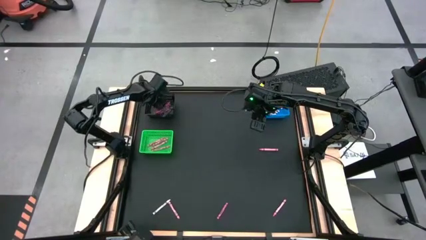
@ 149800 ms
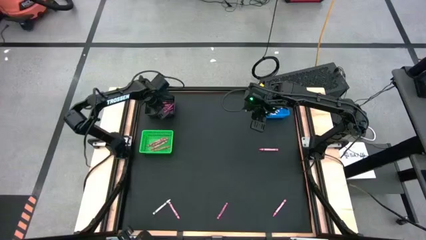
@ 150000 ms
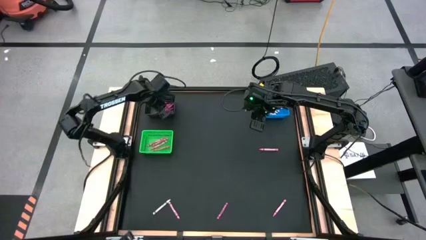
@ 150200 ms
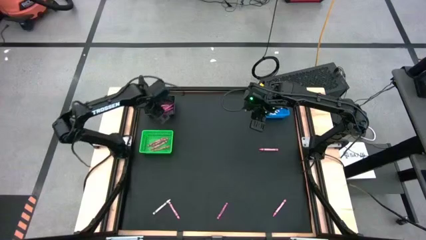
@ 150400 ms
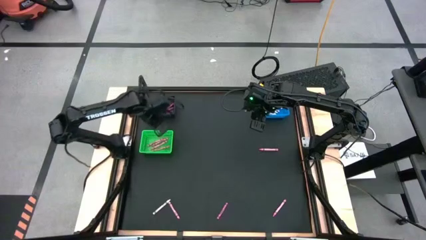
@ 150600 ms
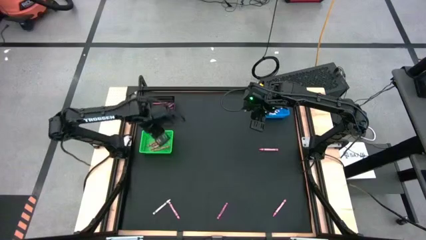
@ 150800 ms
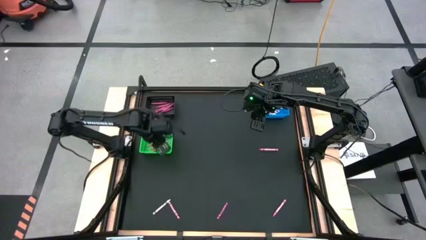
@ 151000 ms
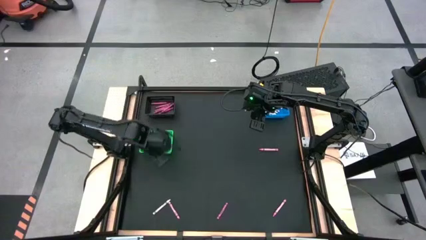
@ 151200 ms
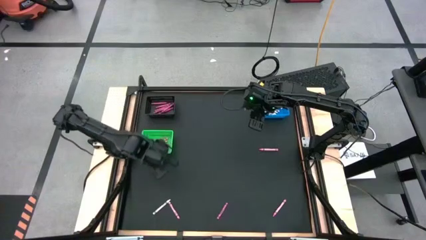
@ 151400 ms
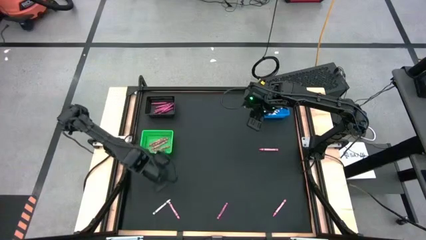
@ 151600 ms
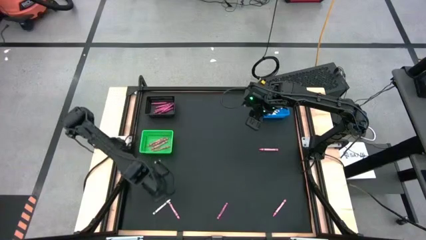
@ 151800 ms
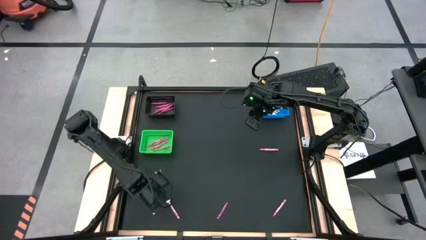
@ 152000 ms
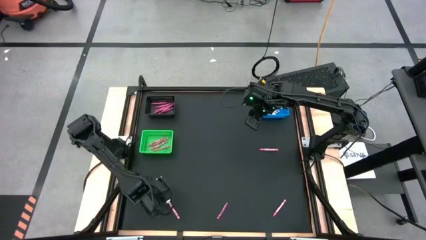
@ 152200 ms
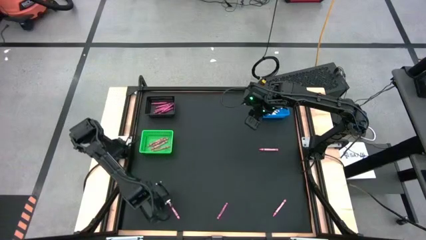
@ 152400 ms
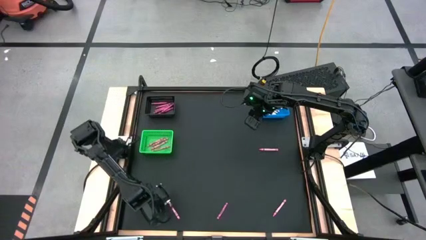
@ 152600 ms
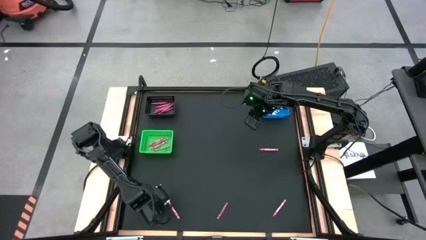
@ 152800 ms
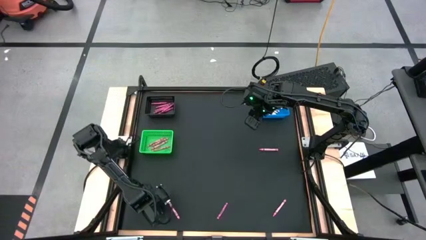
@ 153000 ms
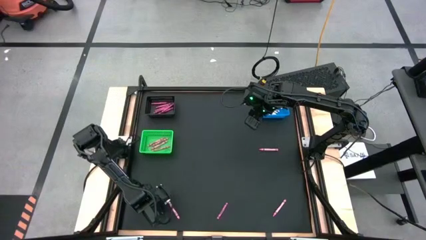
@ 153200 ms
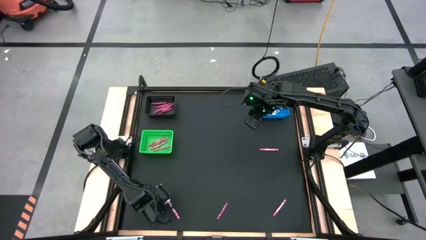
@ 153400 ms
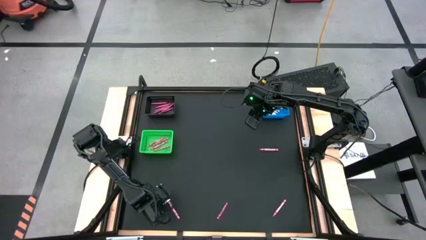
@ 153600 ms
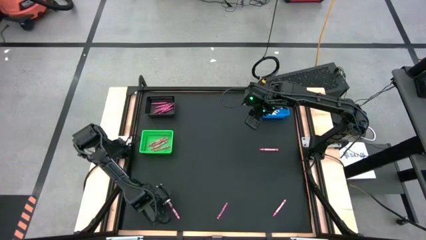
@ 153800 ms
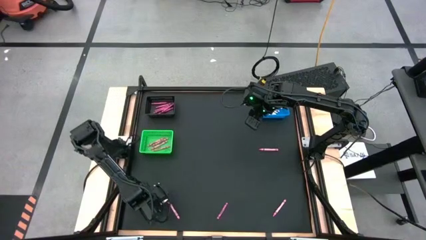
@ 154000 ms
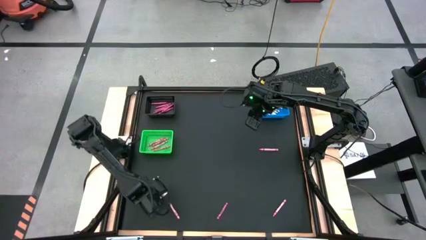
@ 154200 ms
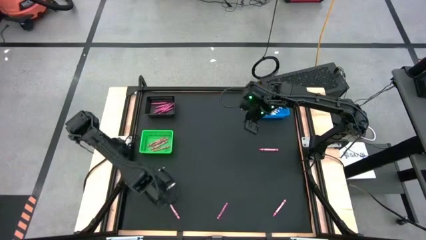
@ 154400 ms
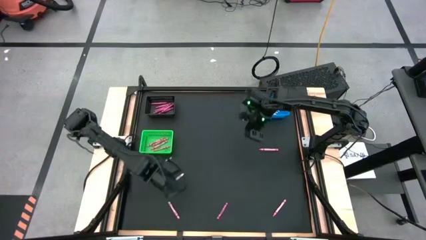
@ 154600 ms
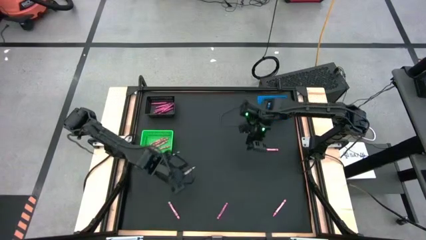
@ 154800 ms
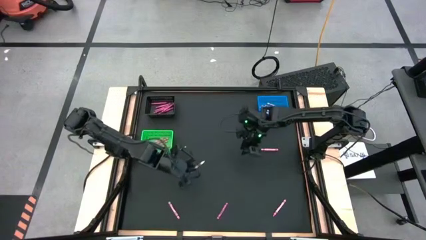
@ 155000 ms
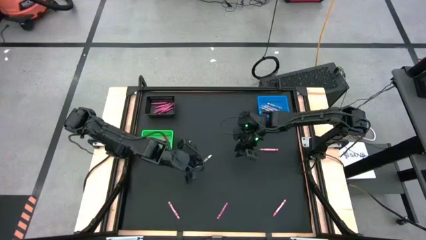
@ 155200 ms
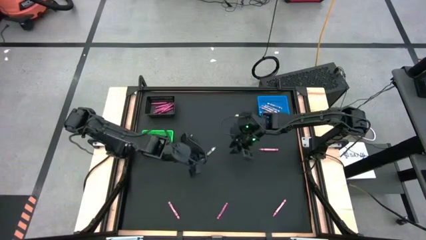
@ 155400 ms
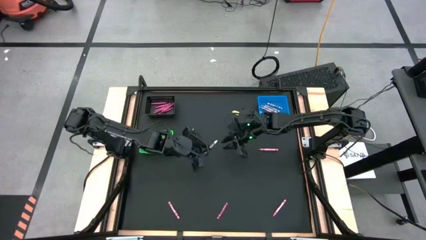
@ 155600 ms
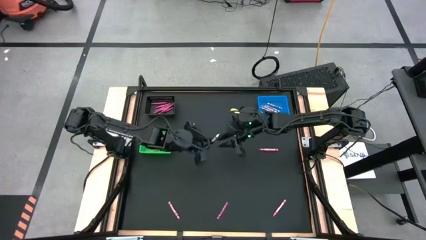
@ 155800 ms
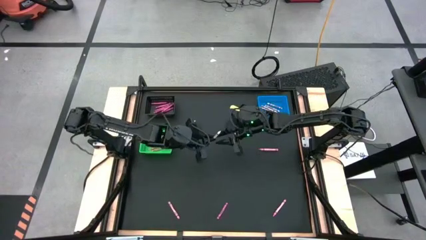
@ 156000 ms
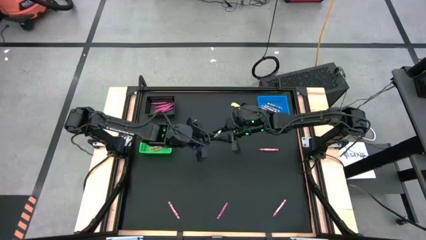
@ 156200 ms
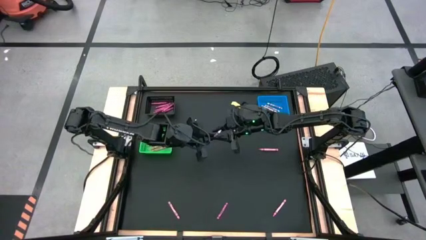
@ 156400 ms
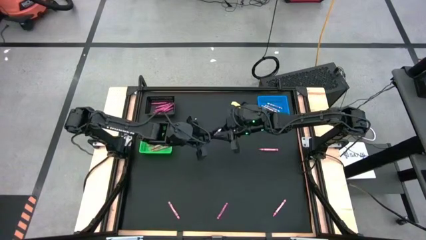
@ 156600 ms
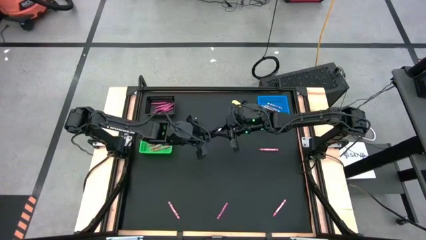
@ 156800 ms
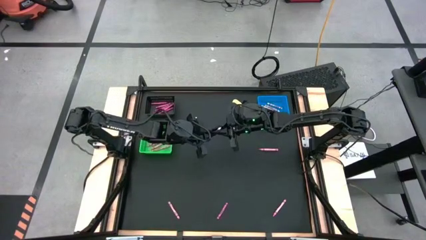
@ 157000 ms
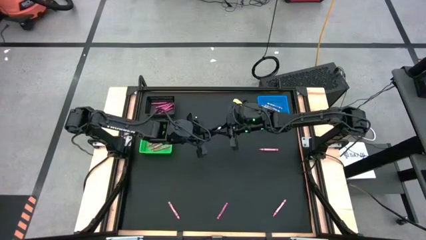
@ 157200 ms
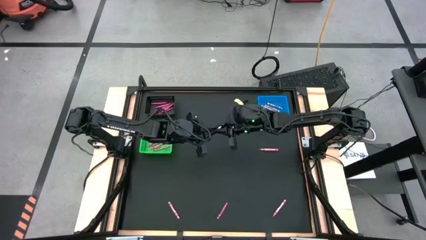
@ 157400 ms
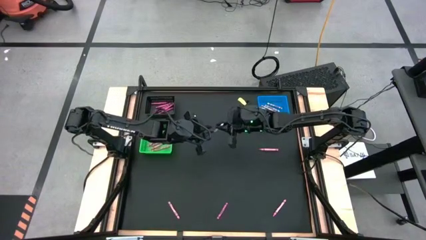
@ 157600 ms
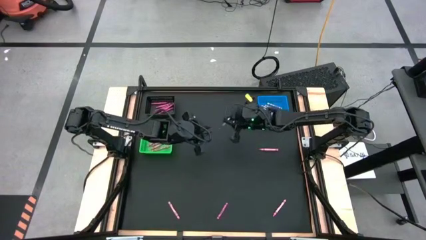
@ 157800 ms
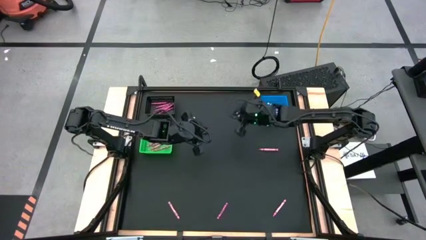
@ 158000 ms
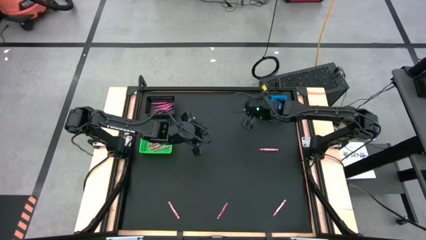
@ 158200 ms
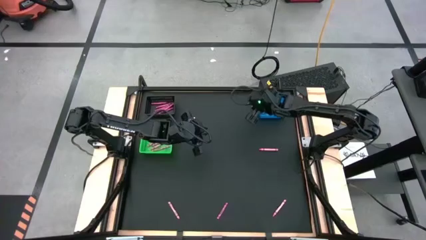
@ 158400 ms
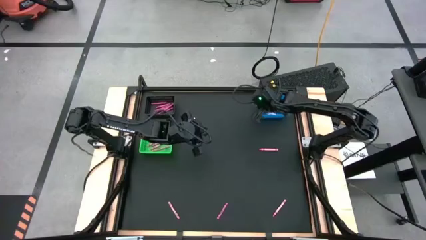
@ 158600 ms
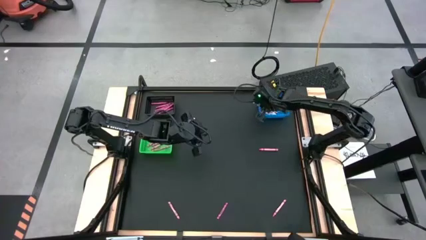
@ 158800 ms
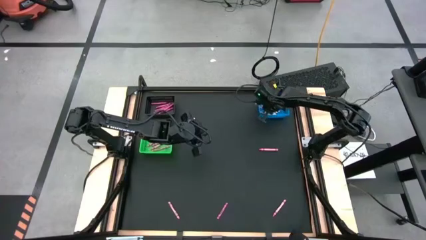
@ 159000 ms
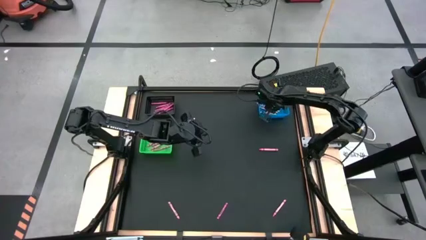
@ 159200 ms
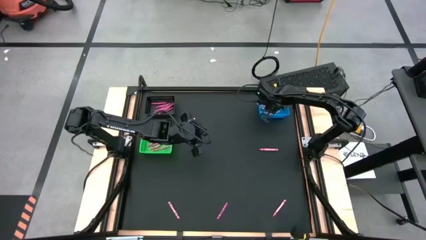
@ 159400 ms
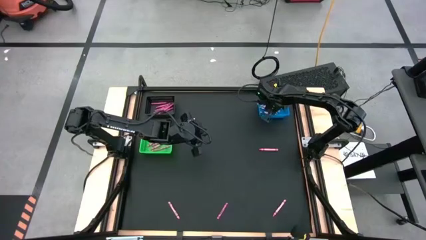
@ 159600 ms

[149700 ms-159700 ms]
Task: Sort crayons
Put the white crayon into the blue bin

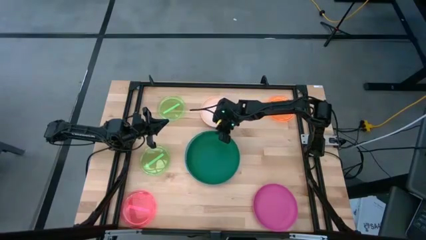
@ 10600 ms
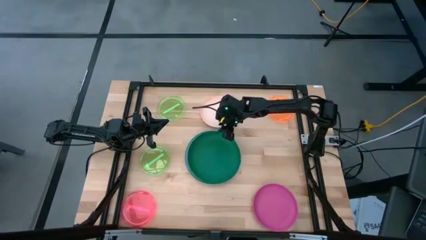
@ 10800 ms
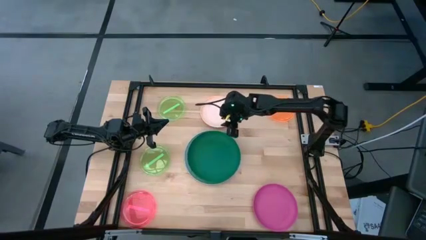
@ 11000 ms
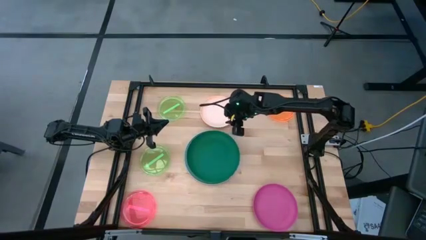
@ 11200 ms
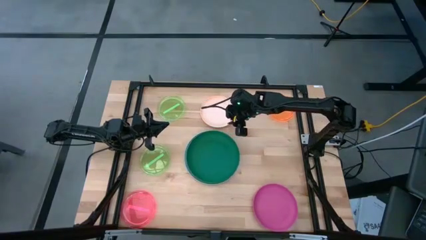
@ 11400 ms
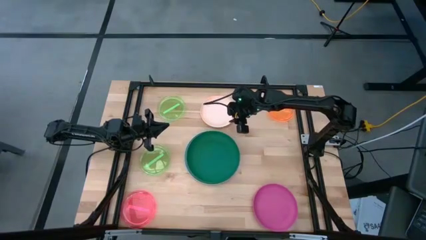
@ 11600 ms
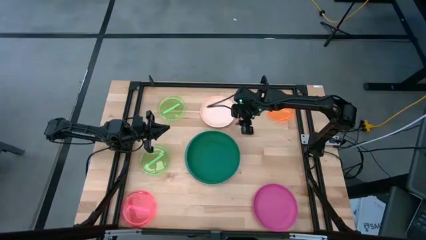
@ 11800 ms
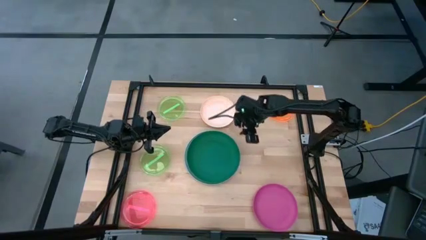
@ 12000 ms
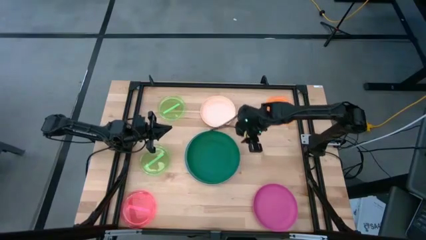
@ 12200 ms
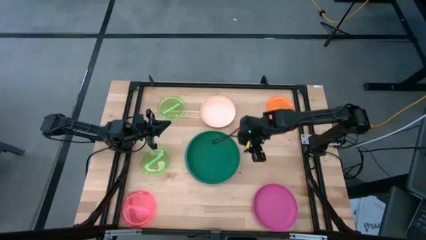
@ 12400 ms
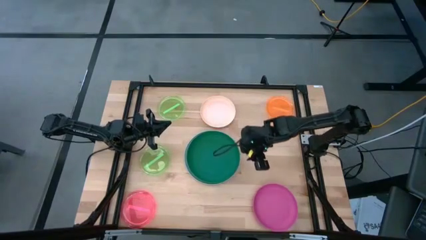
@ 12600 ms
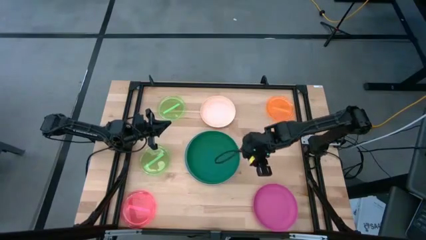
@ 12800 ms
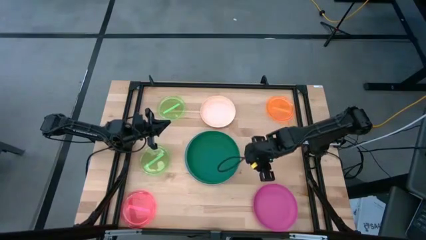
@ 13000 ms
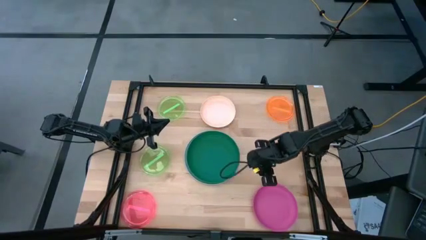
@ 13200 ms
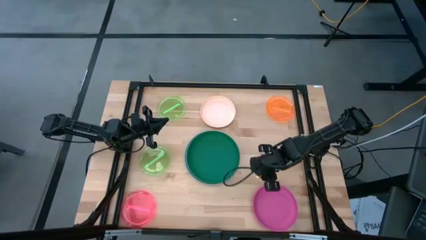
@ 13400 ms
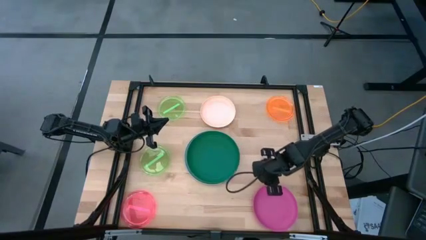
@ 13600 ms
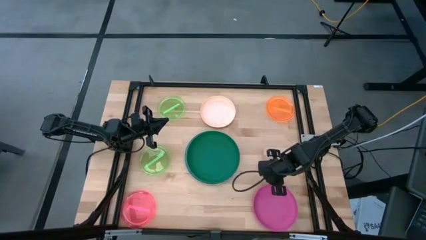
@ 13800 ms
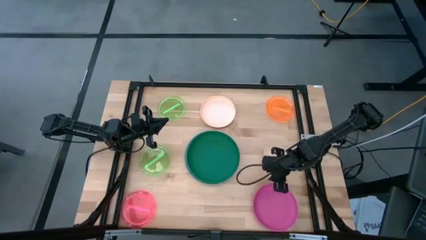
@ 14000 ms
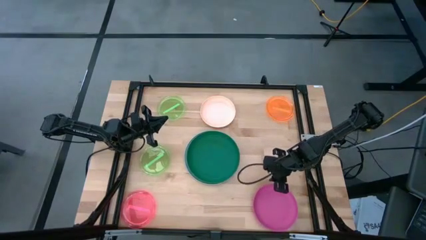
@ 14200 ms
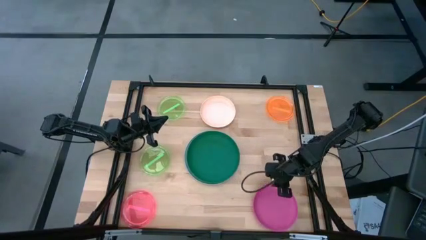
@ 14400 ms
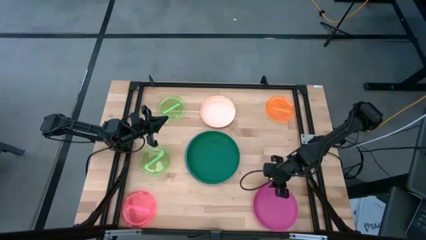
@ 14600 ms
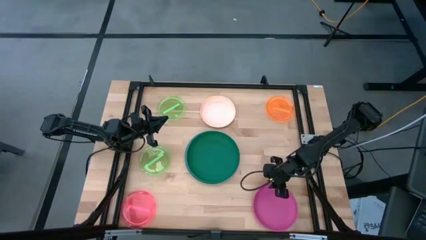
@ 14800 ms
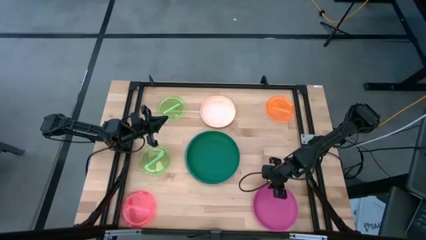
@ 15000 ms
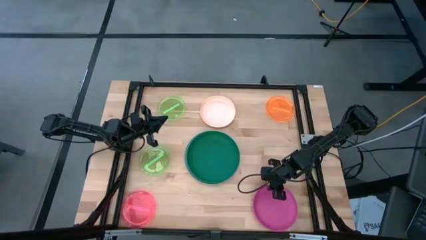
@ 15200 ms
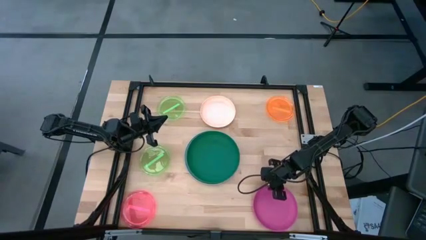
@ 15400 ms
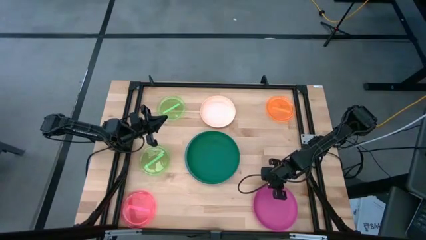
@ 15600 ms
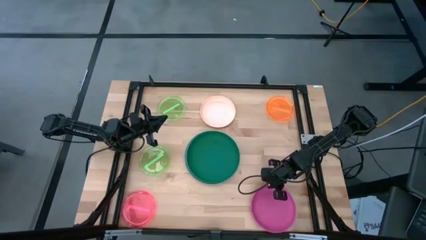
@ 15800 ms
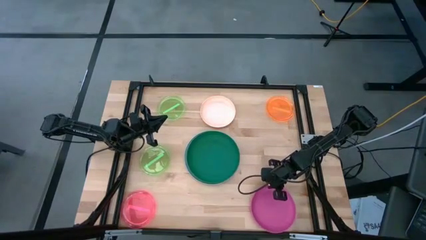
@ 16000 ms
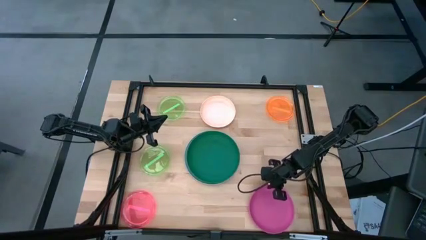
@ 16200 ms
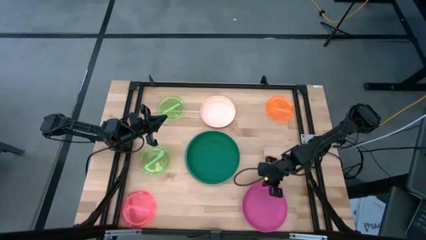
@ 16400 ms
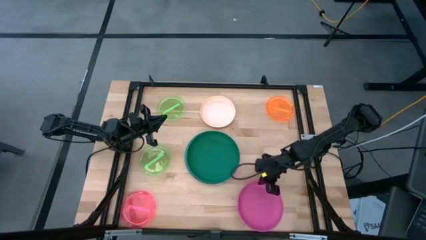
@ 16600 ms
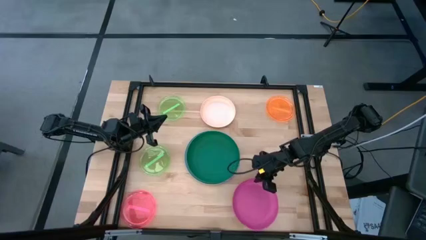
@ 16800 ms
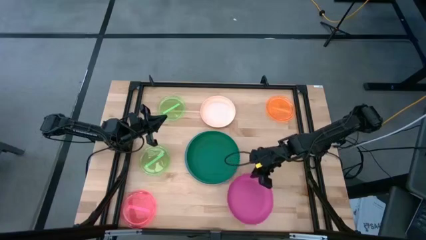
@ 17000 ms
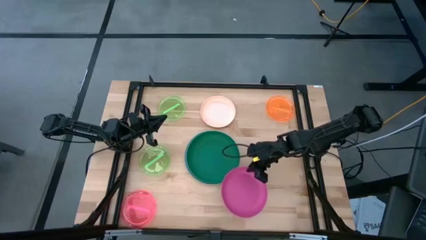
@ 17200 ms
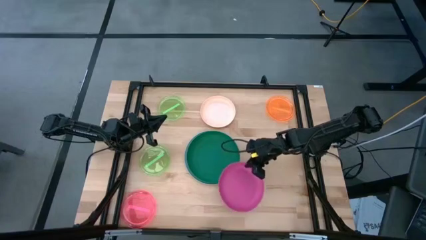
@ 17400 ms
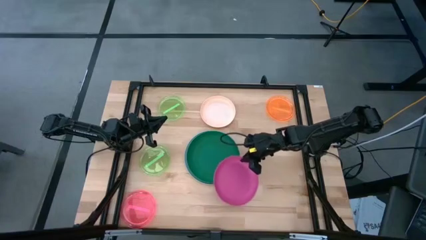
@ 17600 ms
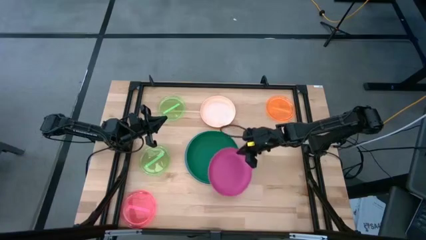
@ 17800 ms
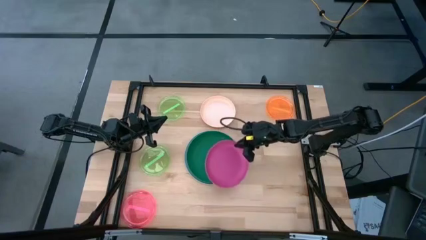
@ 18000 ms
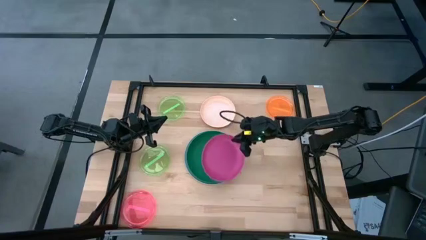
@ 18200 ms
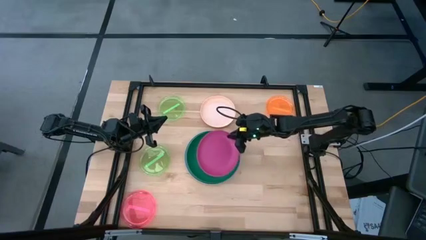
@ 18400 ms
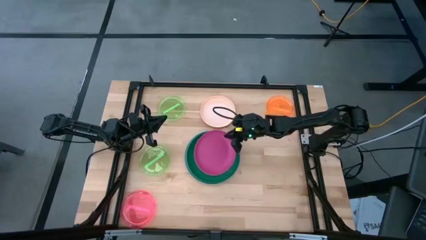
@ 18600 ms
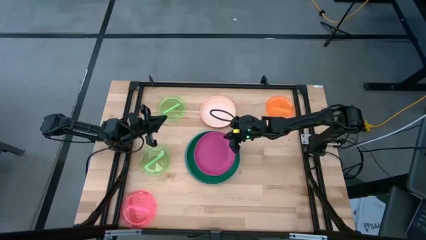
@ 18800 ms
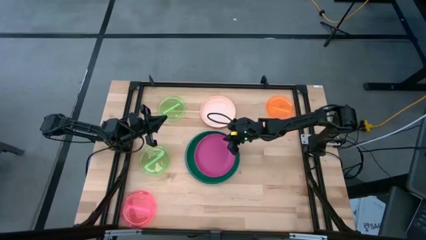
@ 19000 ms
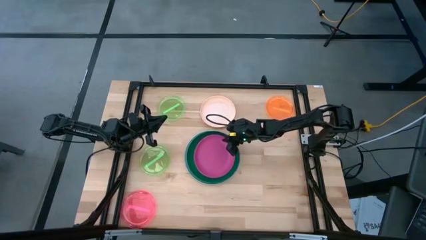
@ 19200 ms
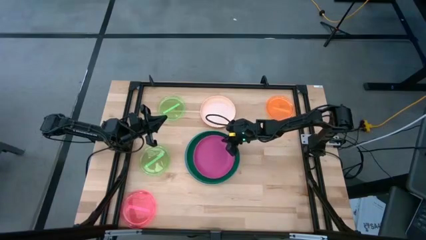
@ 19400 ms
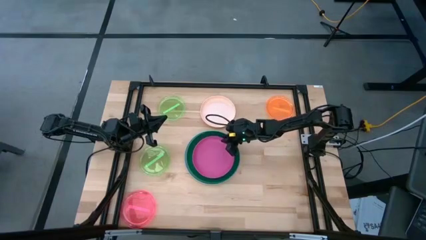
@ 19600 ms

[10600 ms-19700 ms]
Task: Stack plastic plates
Stack the pink plate on top of the green plate
